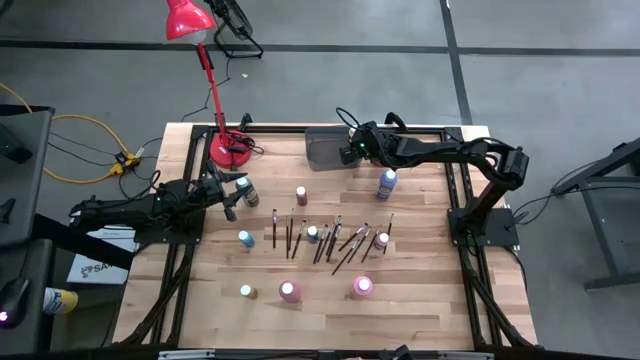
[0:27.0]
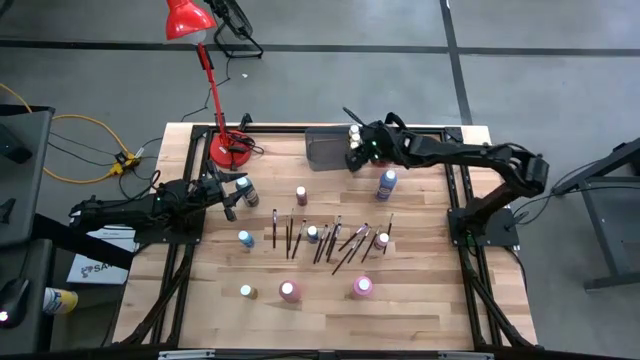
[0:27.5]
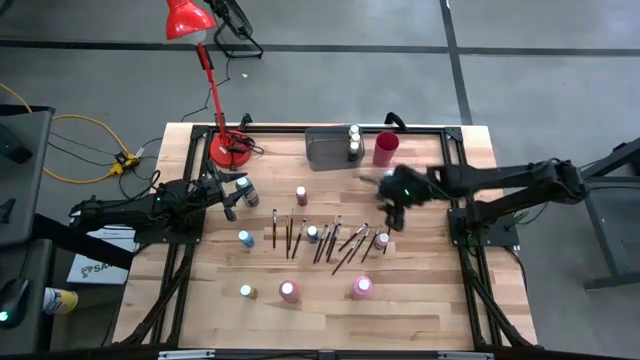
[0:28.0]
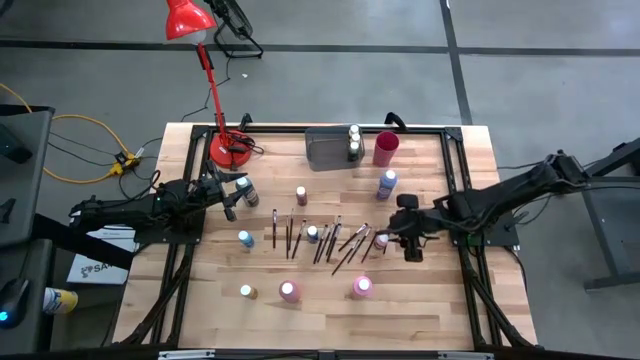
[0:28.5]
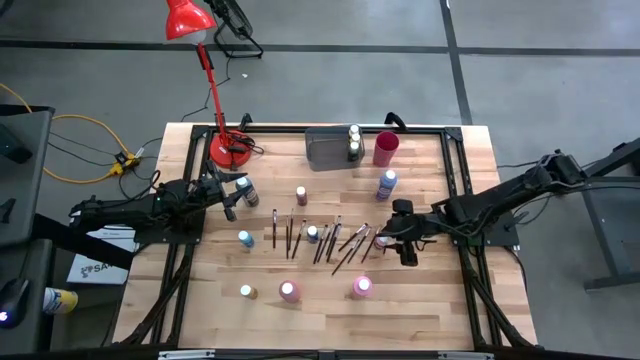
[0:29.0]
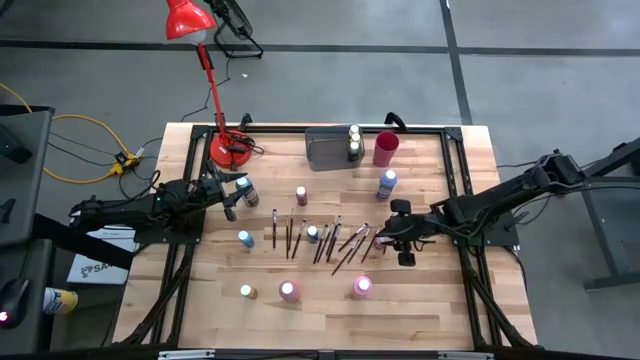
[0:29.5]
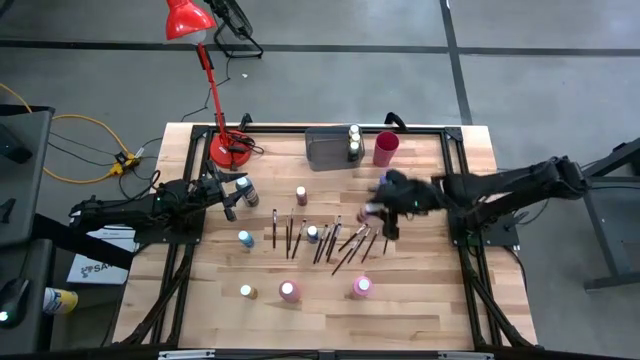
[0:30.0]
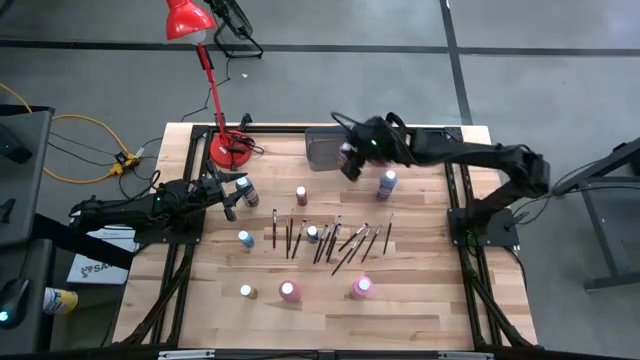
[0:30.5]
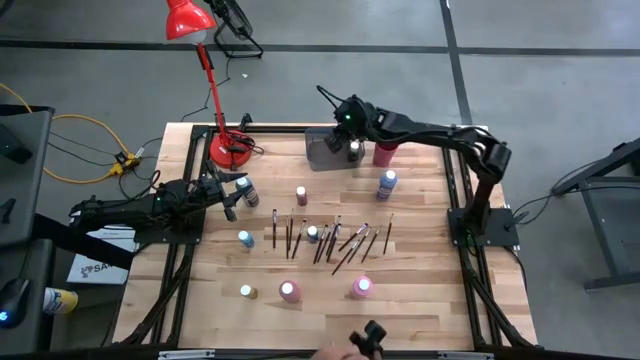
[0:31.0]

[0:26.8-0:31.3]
Task: Pick & Place Paint Supplies
Put the small pink paint bottle into the black bin

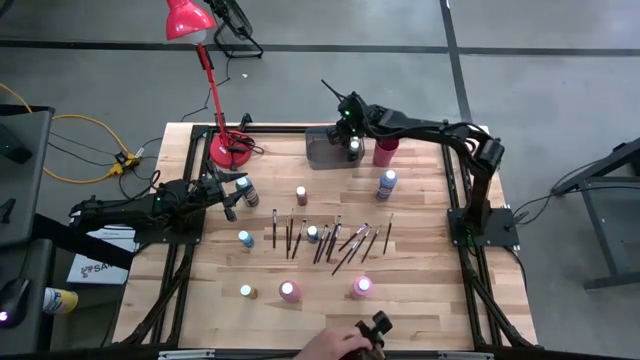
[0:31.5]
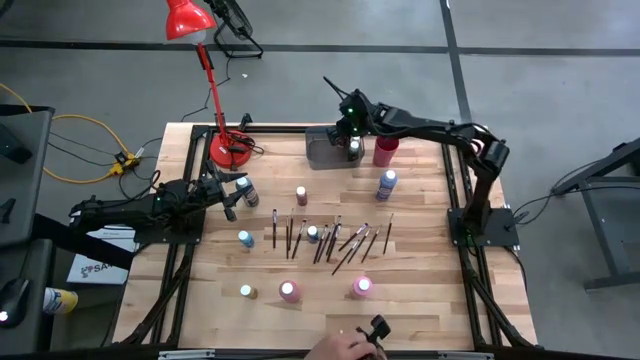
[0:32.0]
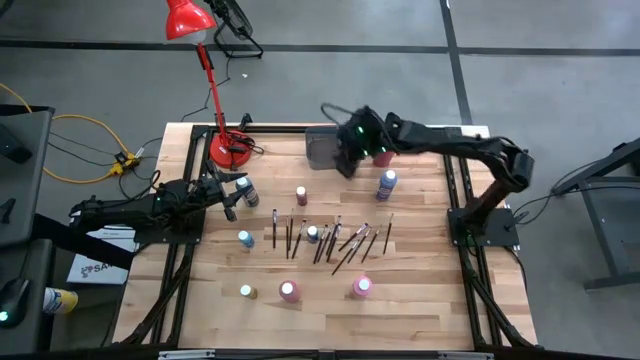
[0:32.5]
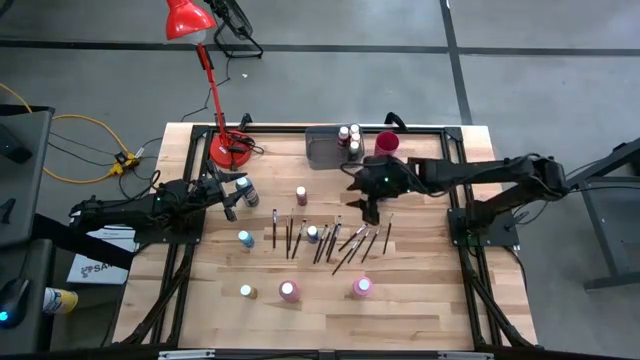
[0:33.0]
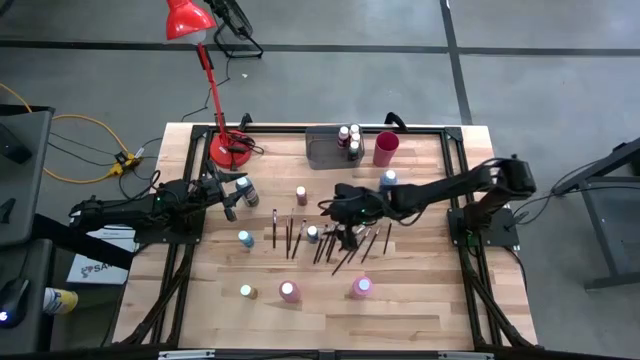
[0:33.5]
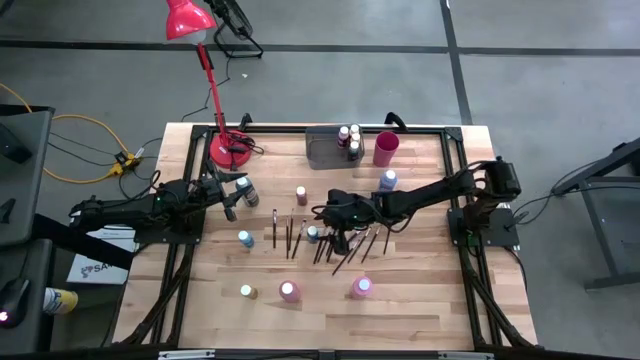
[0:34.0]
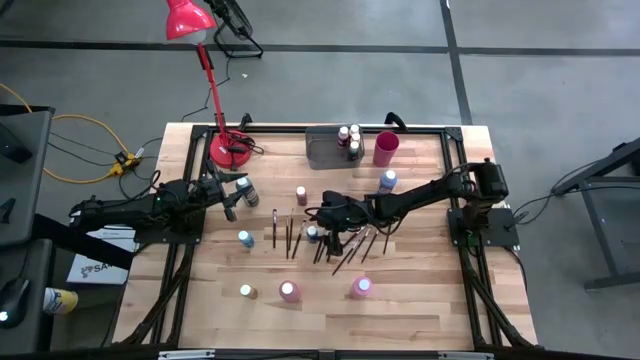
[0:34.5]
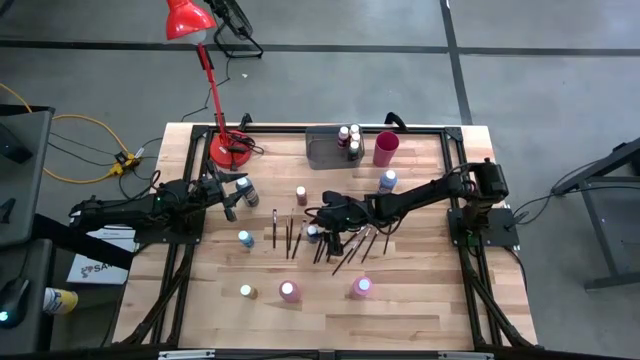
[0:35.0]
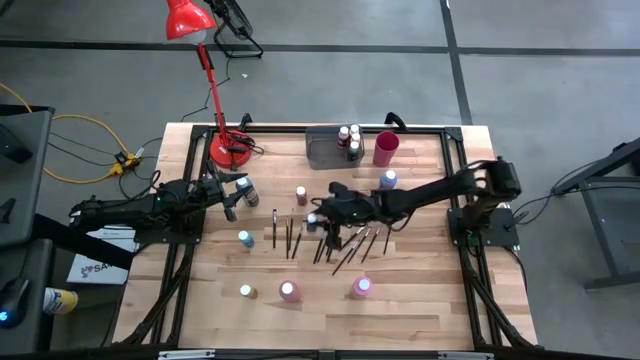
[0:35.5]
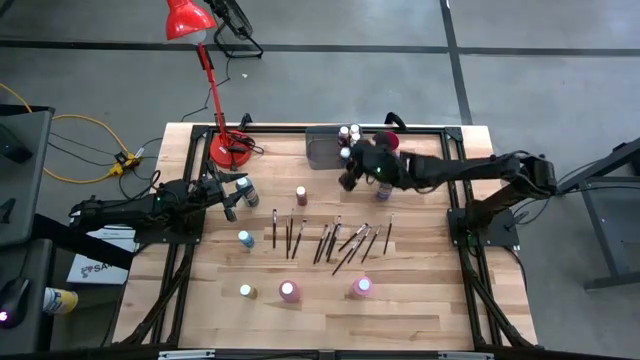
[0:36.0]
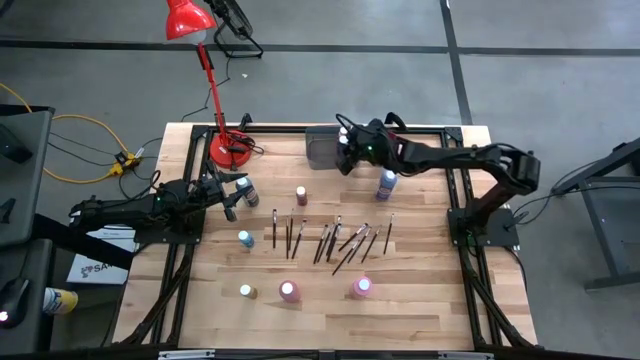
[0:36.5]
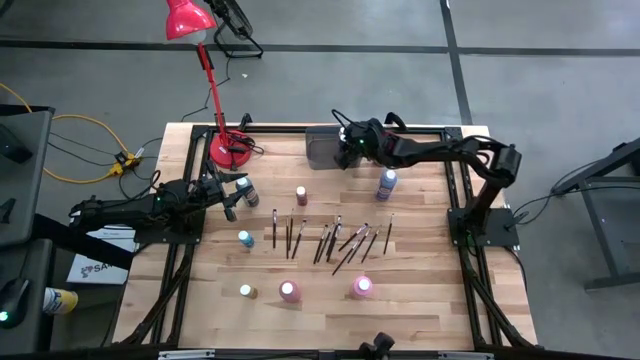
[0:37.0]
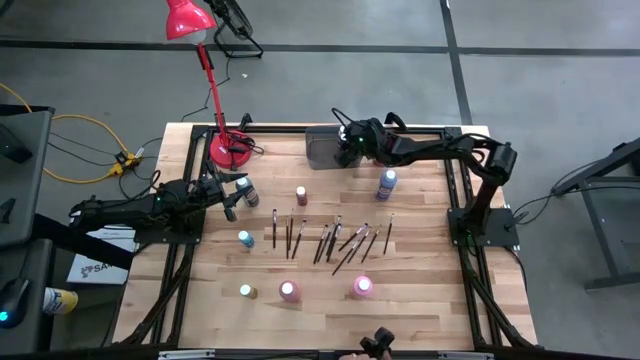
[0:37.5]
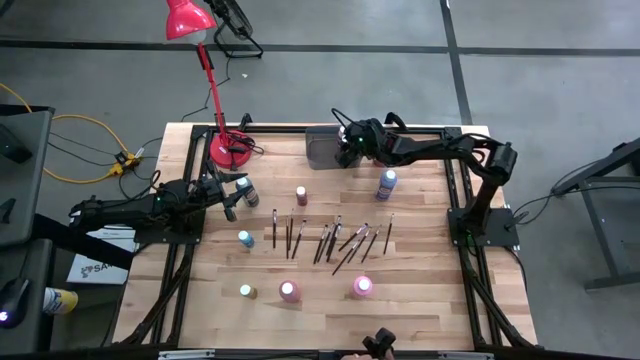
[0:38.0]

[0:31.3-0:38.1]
Put the small dark blue paint bottle into the black bin

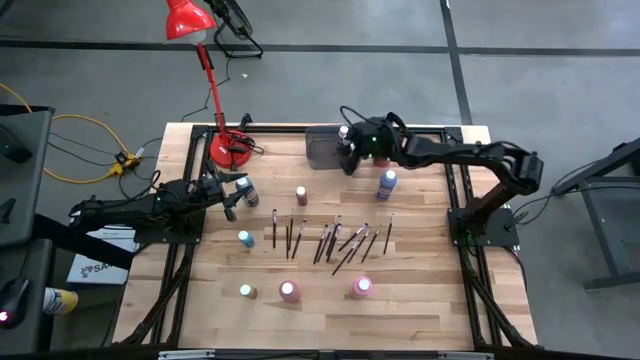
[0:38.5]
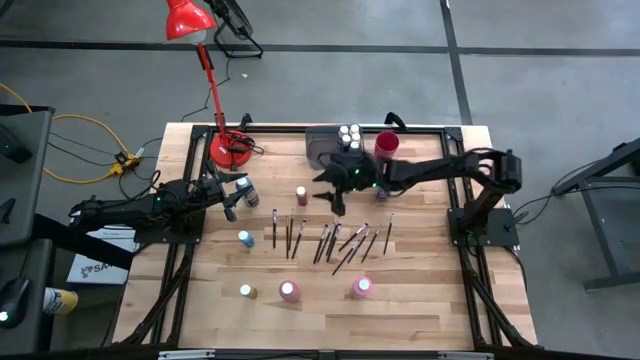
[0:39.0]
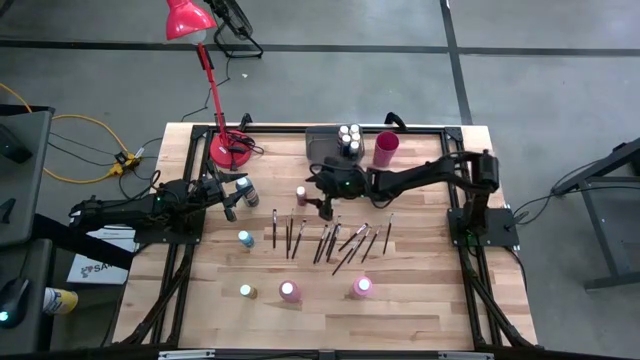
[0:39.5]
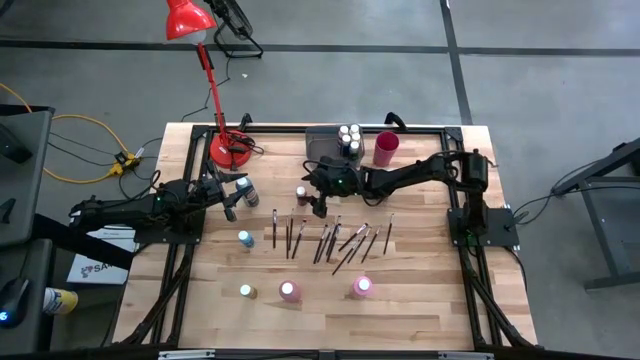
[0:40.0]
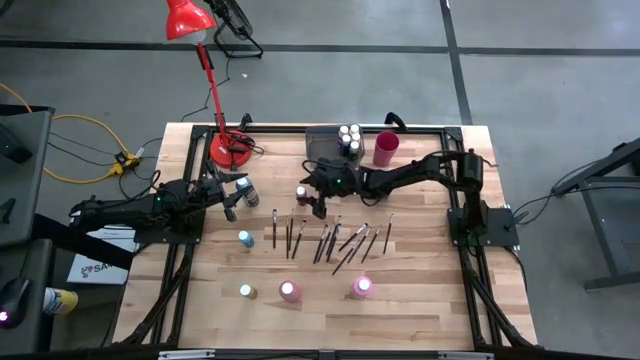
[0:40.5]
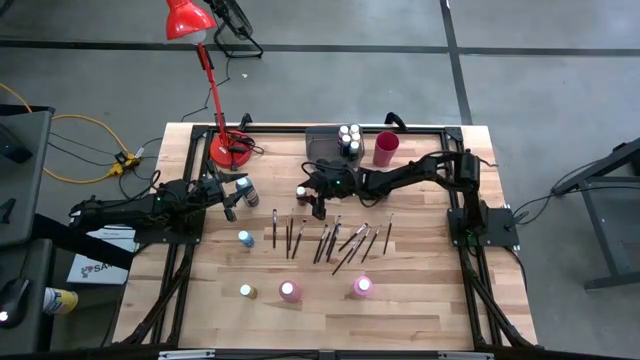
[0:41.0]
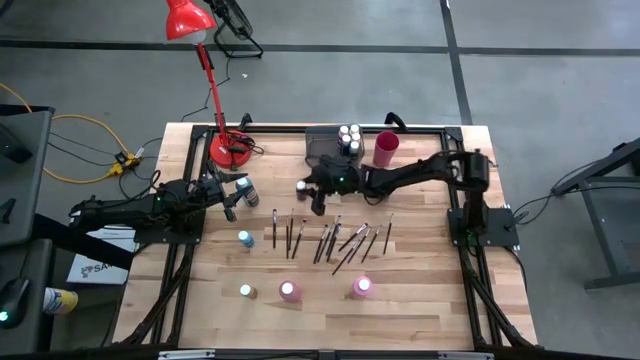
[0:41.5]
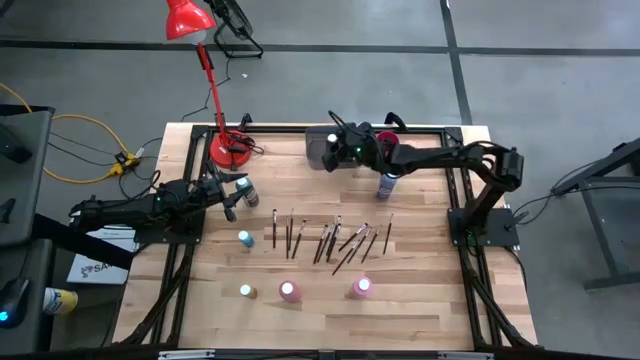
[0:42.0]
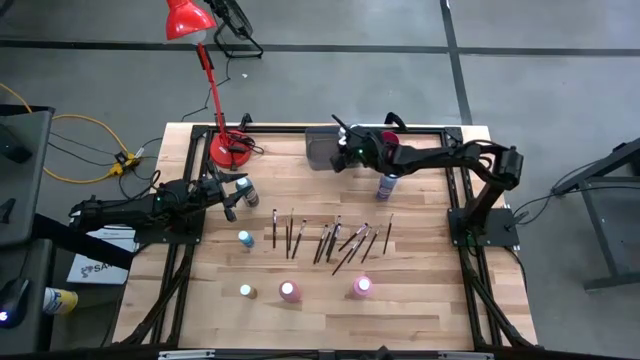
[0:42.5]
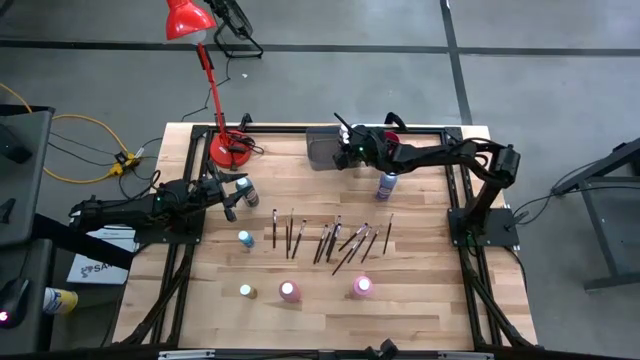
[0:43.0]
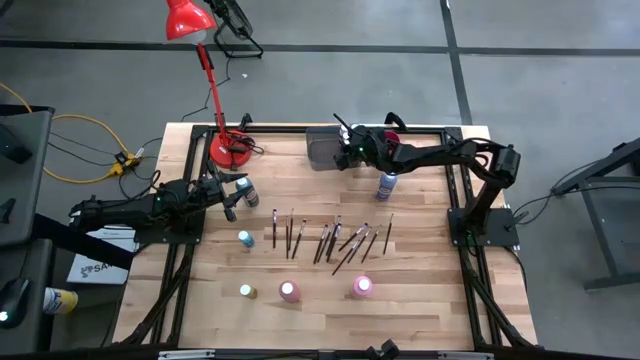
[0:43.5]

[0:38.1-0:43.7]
Put the small red paint bottle into the black bin

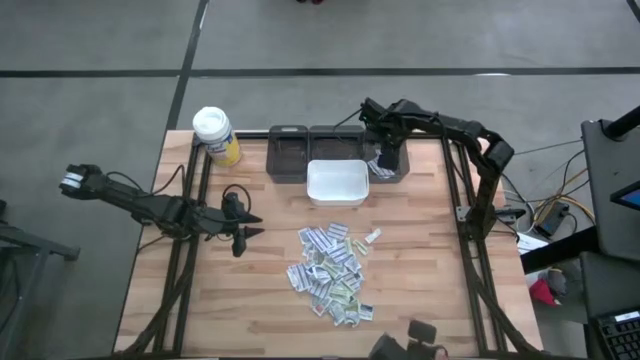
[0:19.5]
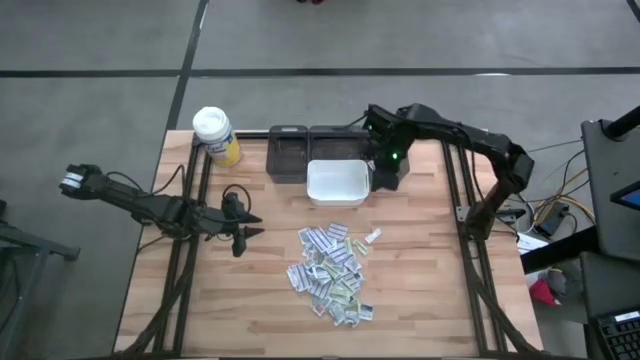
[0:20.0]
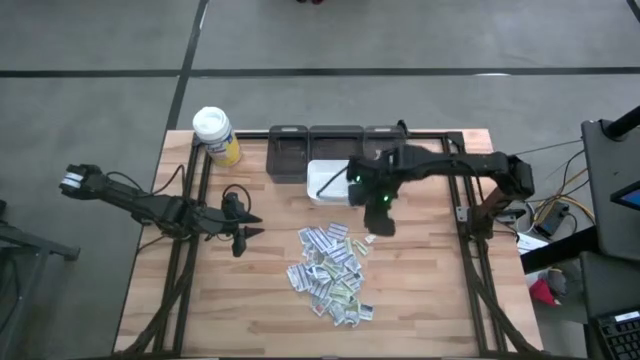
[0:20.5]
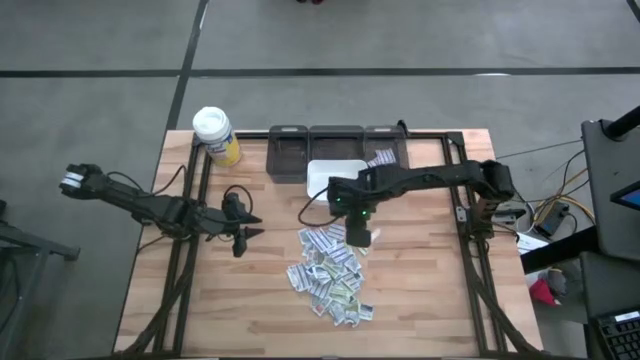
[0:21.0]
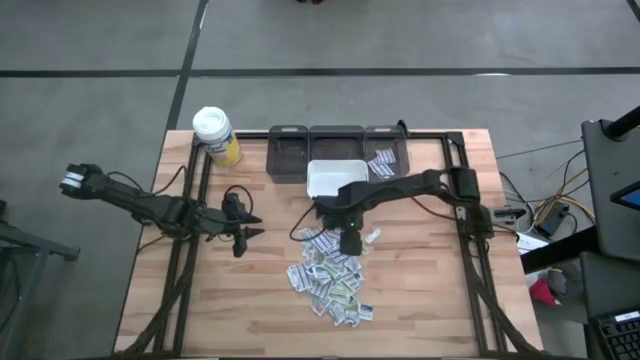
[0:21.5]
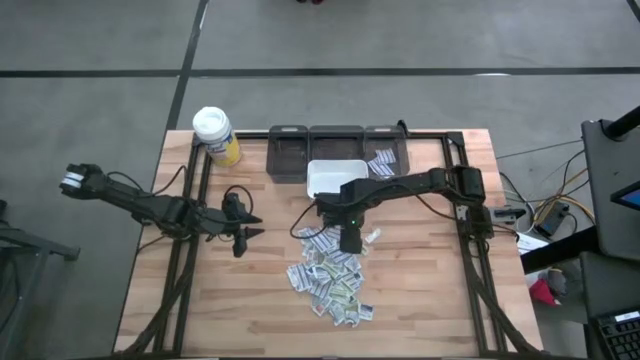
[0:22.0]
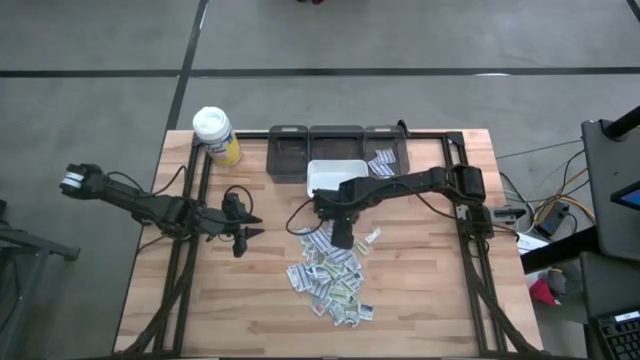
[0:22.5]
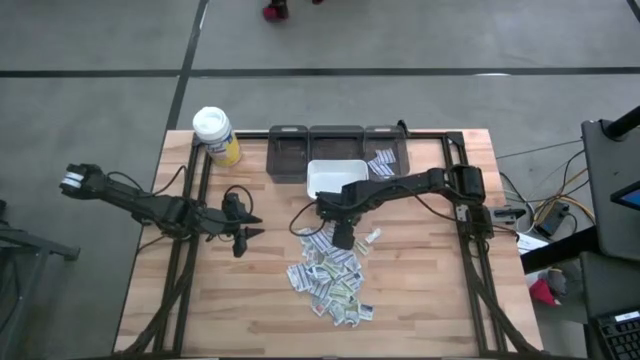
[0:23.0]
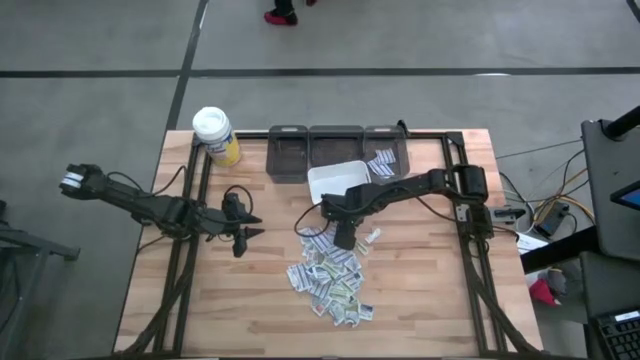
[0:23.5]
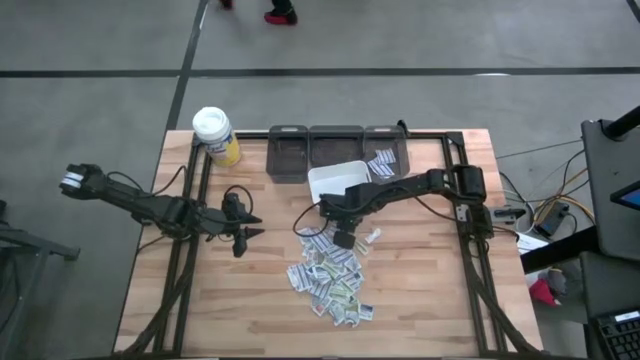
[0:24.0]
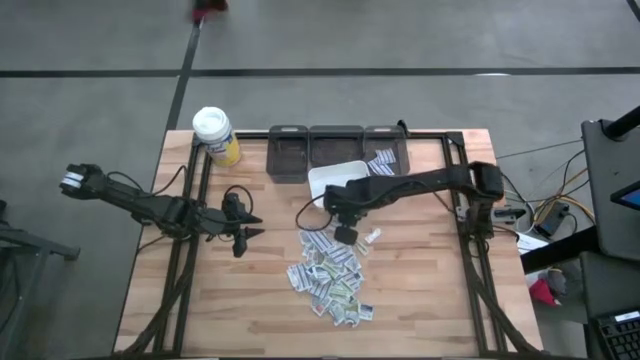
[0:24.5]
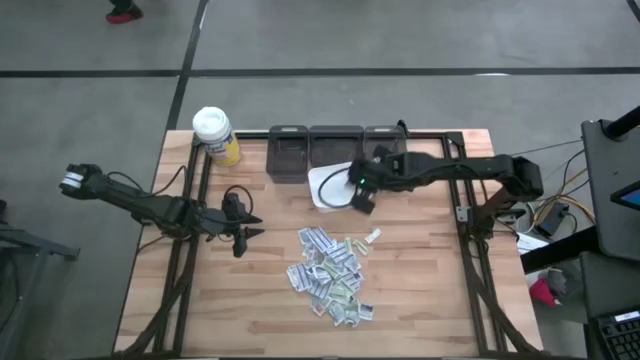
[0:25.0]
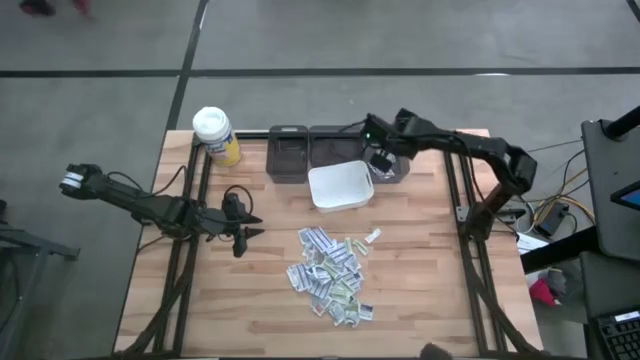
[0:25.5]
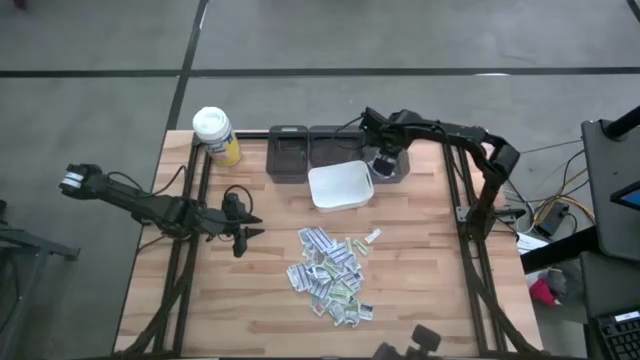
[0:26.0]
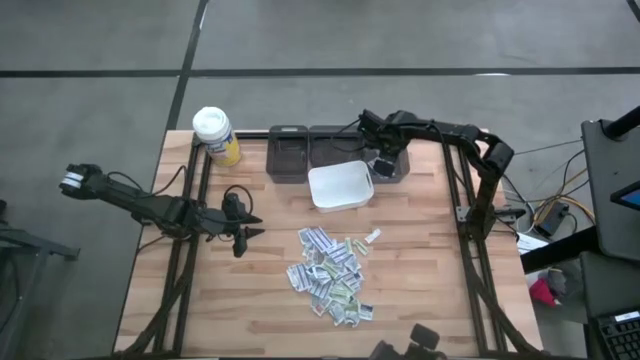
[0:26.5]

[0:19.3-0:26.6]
Task: Pick & Place First Aid Supplies
Put the blue bandage pack into the right black bin
